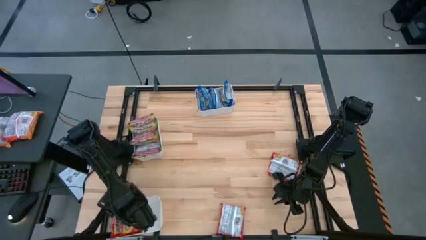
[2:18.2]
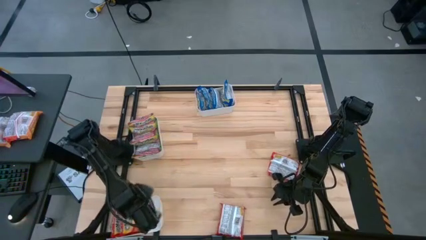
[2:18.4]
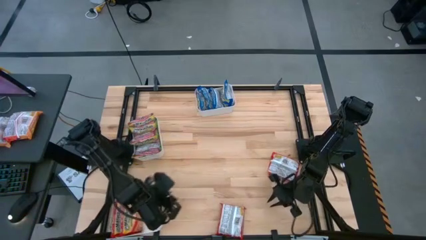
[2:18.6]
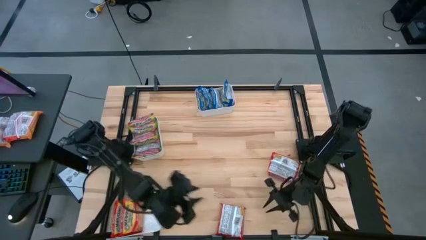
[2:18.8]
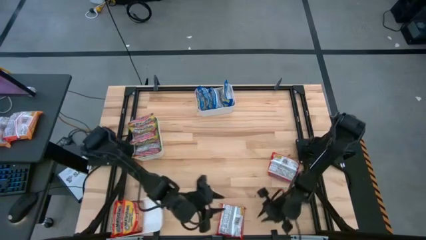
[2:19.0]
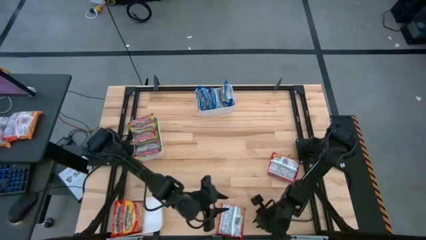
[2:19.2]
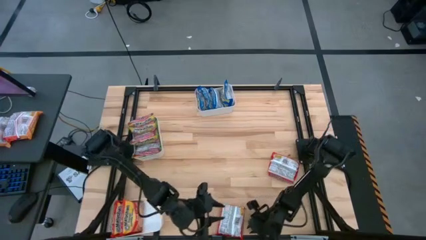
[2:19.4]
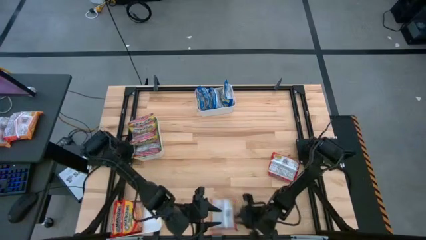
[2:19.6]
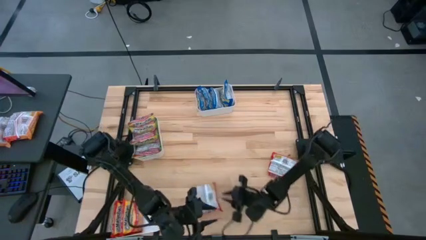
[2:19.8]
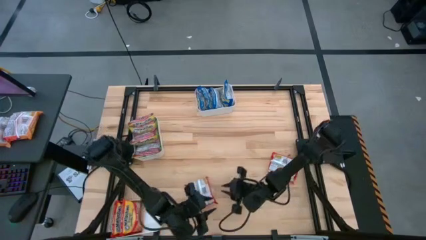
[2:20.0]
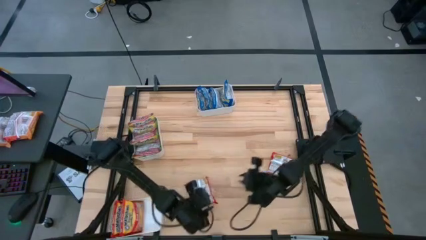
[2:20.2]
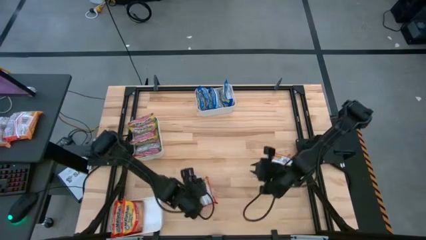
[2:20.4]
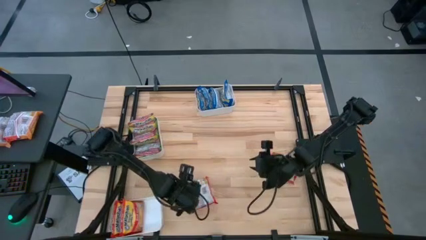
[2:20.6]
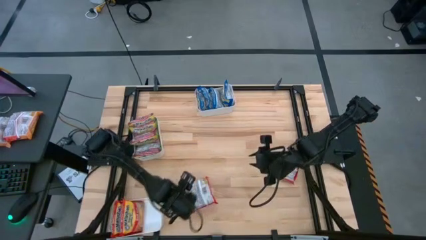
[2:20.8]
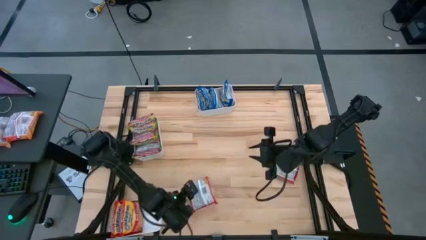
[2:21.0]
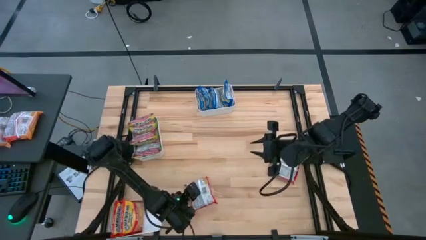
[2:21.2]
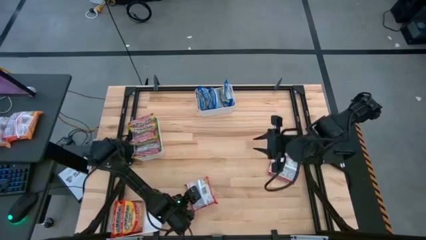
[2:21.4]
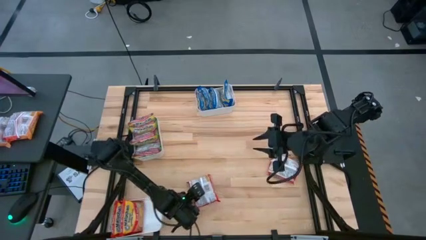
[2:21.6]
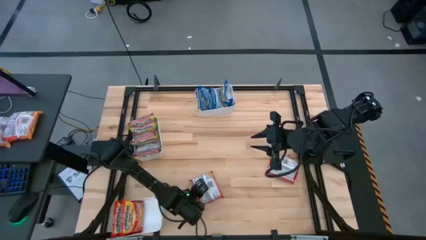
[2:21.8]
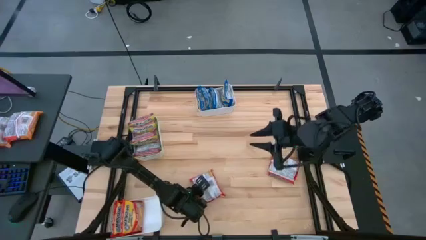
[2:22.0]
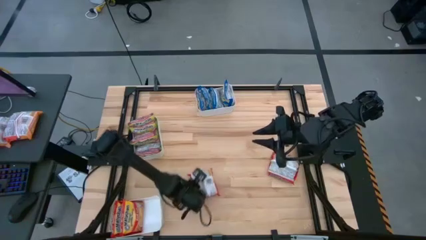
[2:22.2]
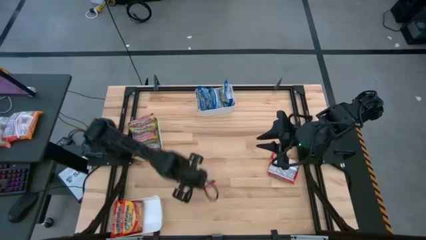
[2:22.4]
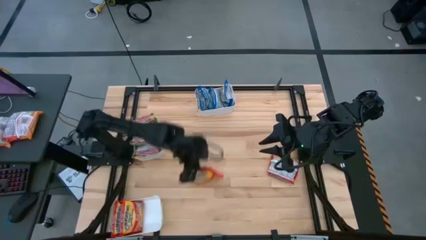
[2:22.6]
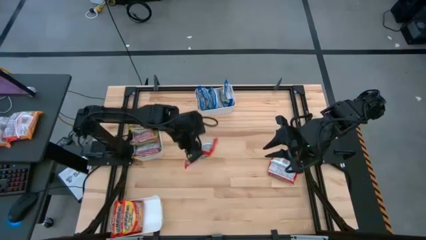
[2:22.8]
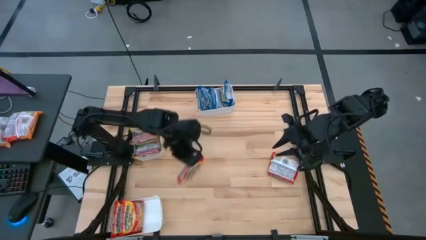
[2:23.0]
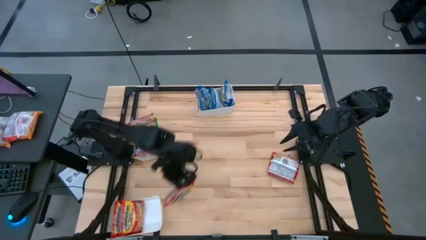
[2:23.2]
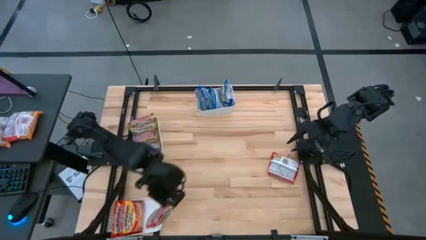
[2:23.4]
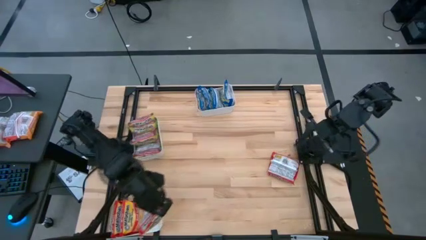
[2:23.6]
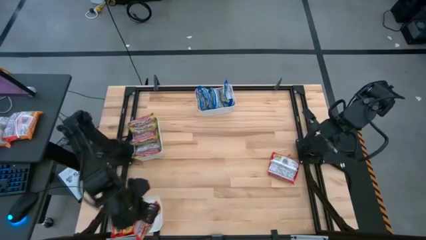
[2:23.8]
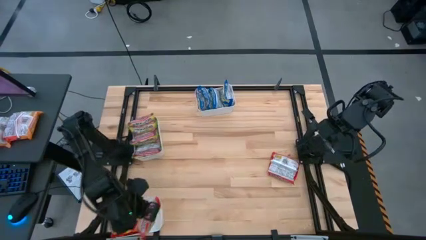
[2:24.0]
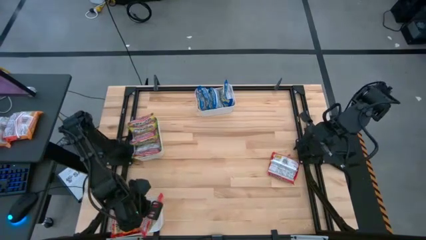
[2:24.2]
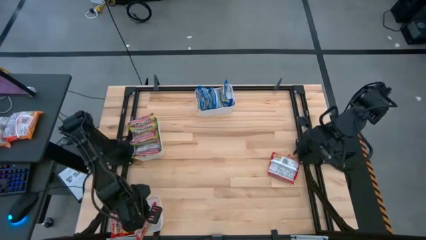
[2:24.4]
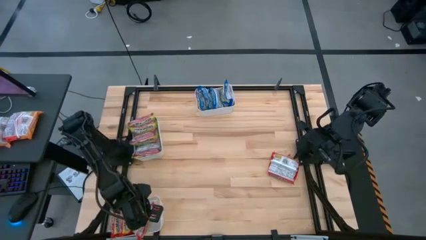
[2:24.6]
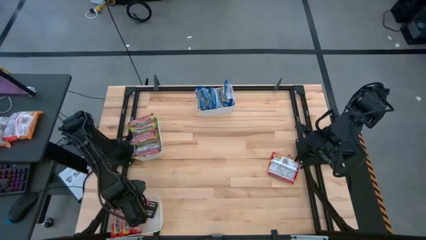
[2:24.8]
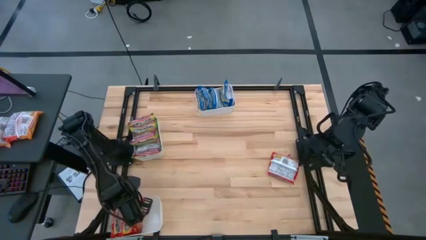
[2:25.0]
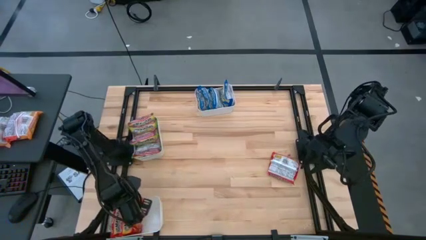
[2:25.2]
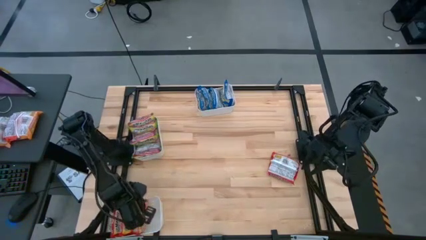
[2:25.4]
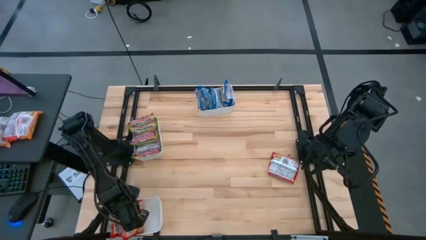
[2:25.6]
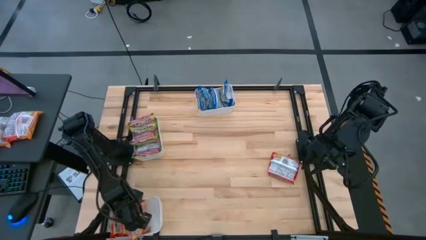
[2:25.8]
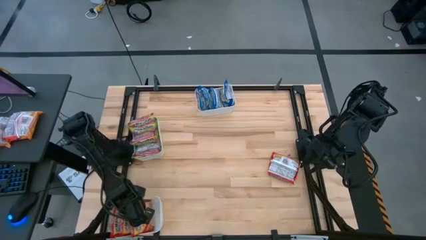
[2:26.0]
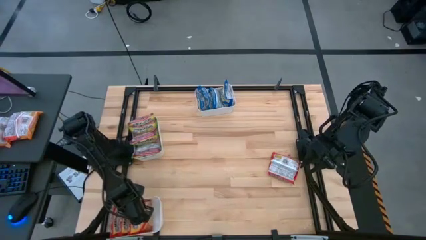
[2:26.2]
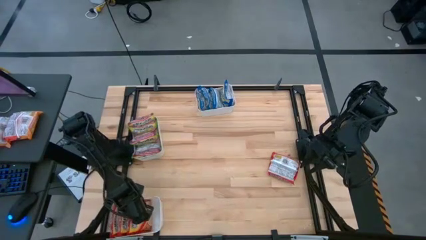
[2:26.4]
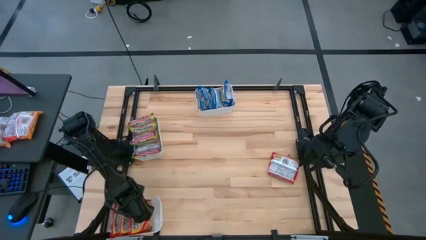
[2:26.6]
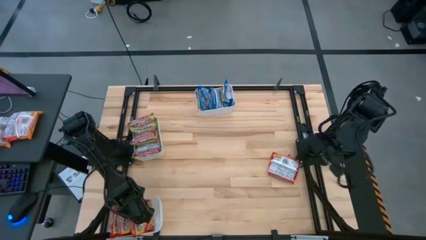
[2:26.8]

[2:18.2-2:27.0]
Task: Sort Maruchan noodles
Put the red noodle pack into the bottom white bin

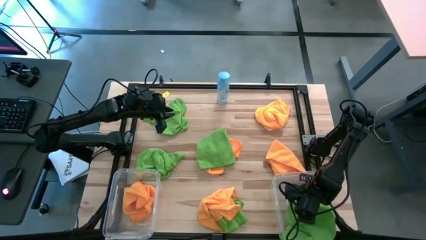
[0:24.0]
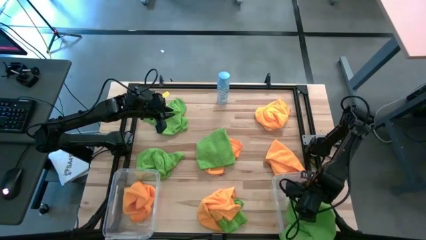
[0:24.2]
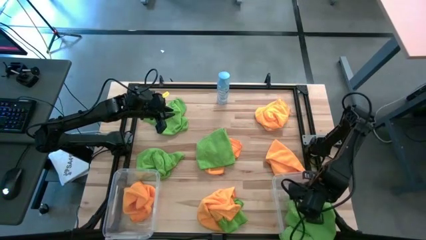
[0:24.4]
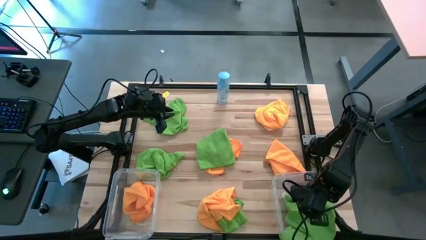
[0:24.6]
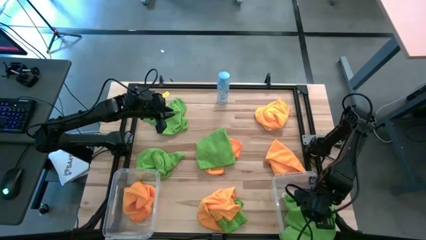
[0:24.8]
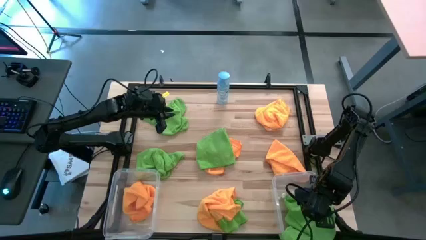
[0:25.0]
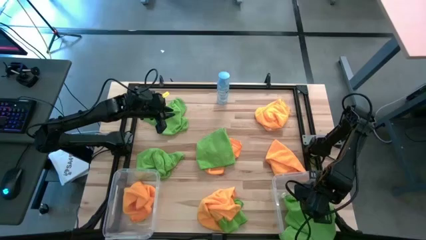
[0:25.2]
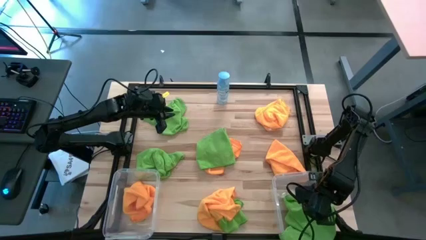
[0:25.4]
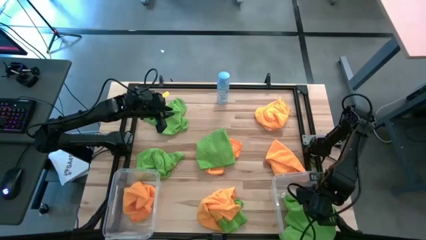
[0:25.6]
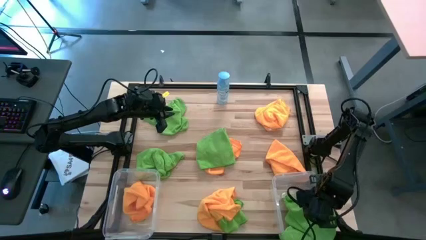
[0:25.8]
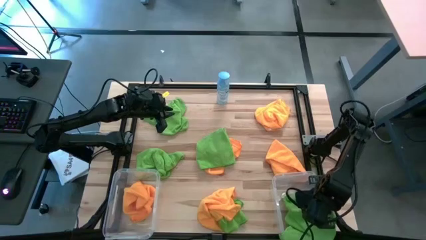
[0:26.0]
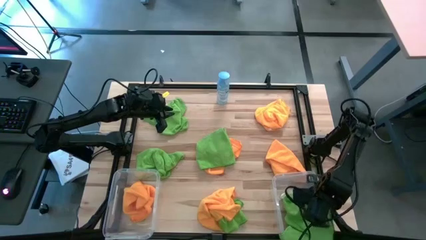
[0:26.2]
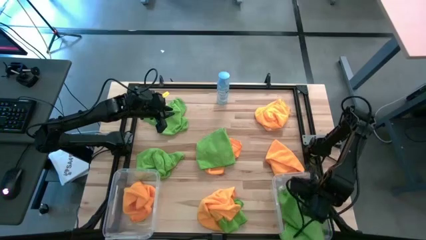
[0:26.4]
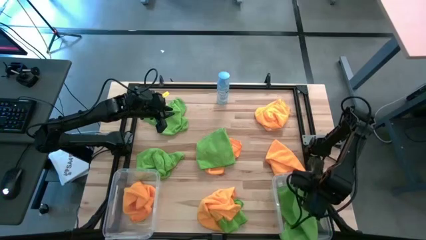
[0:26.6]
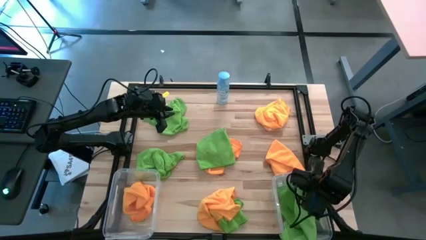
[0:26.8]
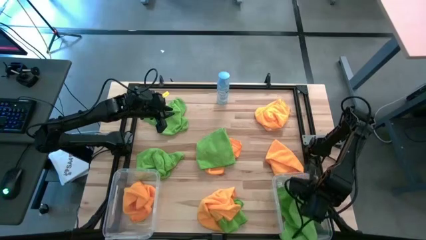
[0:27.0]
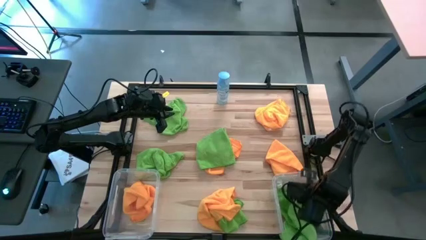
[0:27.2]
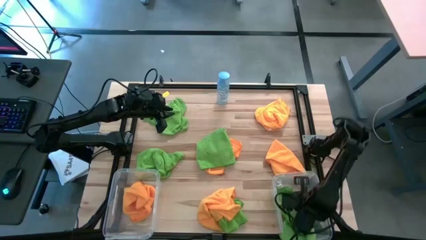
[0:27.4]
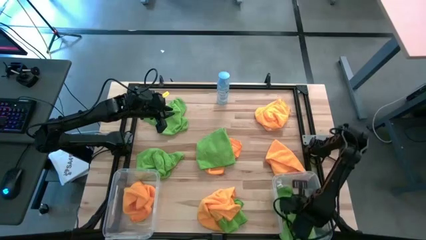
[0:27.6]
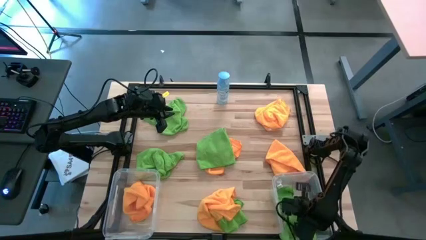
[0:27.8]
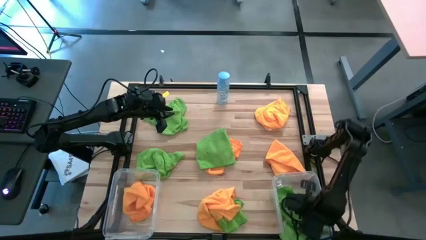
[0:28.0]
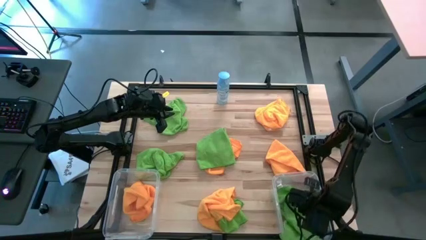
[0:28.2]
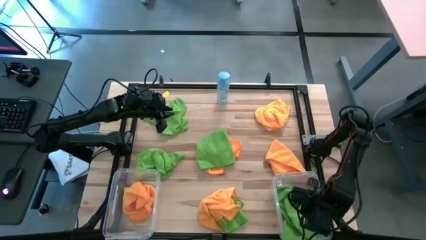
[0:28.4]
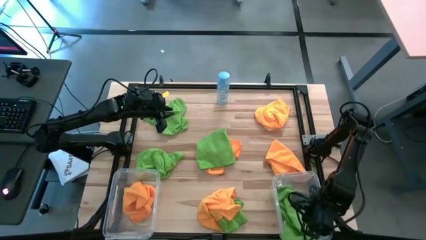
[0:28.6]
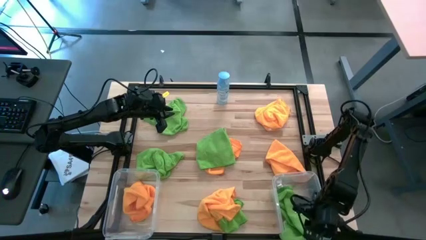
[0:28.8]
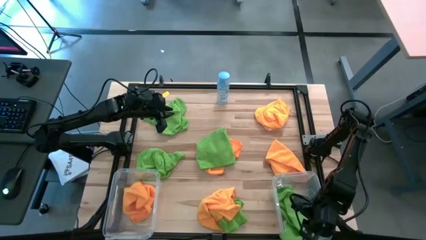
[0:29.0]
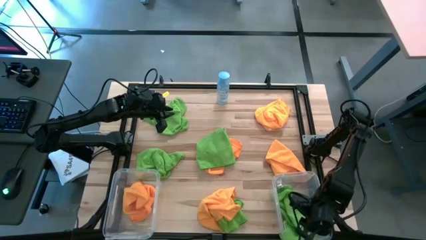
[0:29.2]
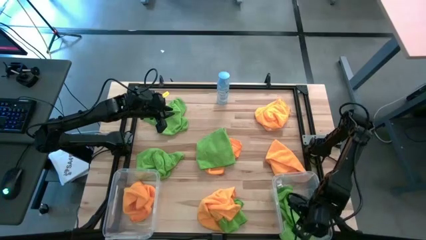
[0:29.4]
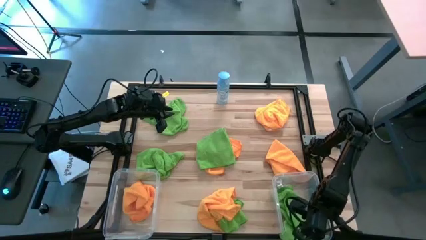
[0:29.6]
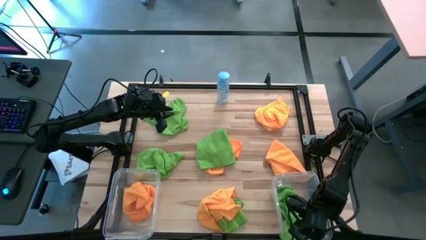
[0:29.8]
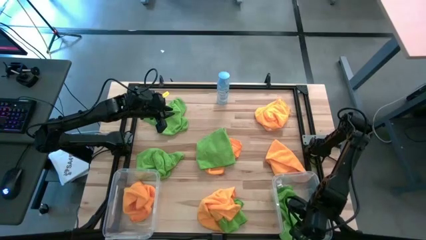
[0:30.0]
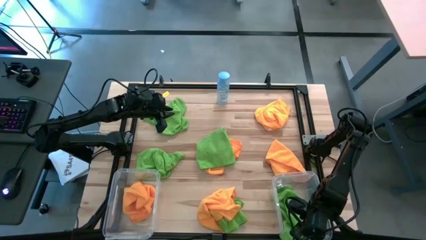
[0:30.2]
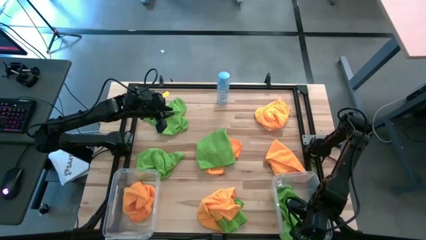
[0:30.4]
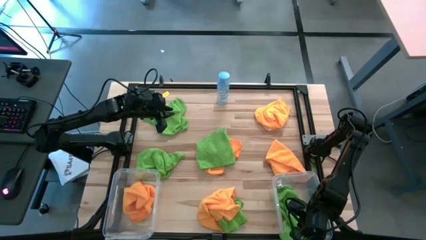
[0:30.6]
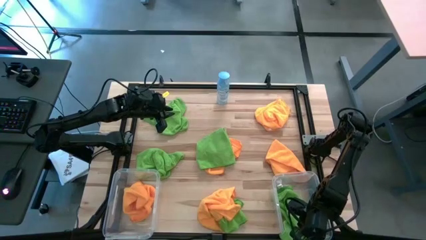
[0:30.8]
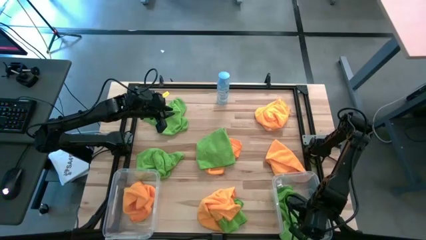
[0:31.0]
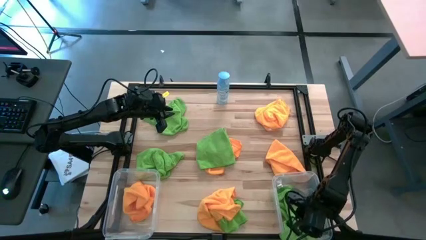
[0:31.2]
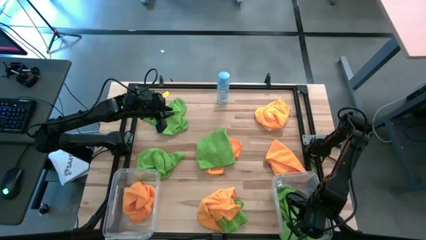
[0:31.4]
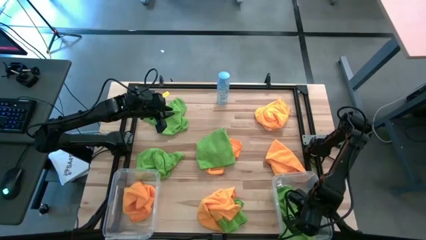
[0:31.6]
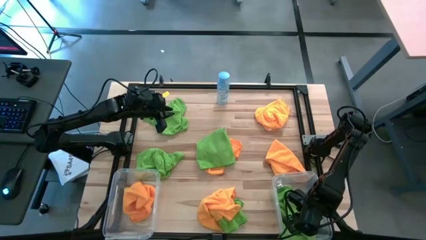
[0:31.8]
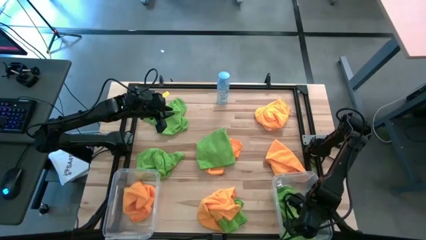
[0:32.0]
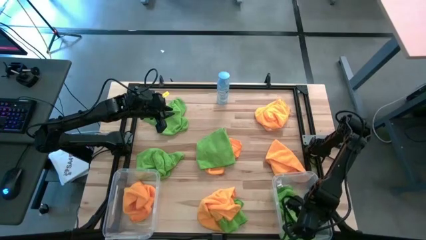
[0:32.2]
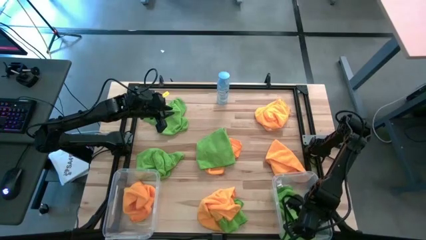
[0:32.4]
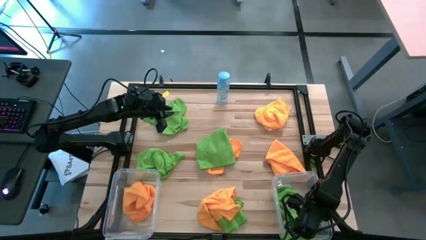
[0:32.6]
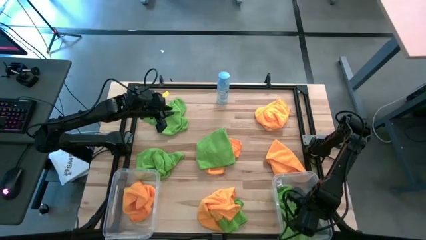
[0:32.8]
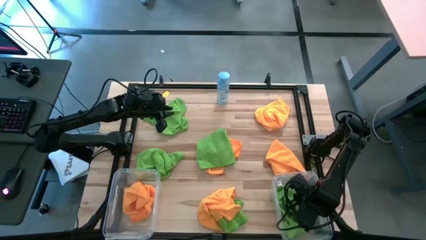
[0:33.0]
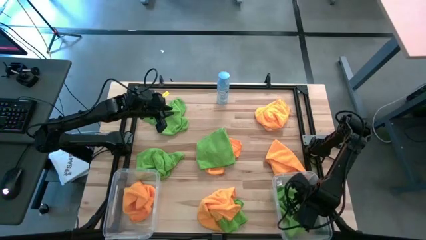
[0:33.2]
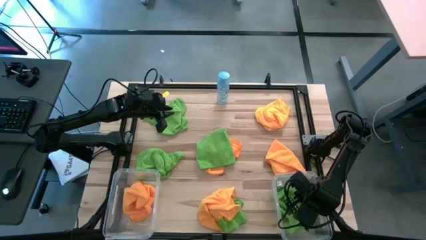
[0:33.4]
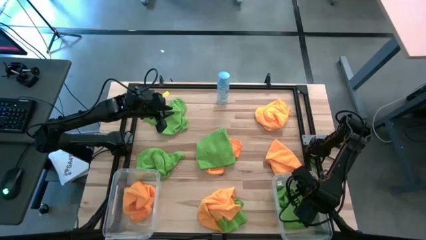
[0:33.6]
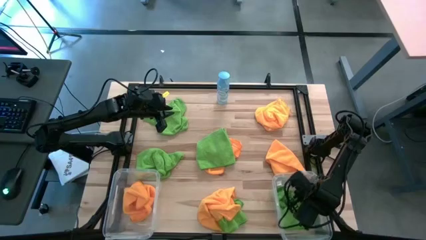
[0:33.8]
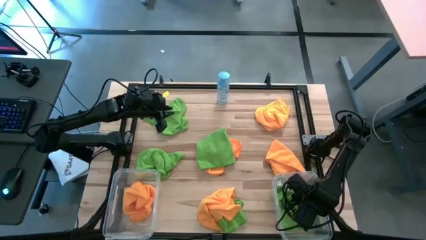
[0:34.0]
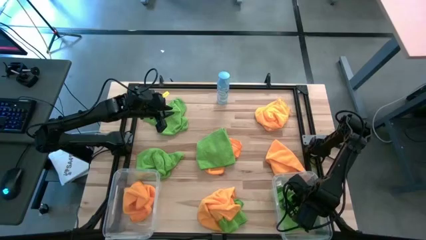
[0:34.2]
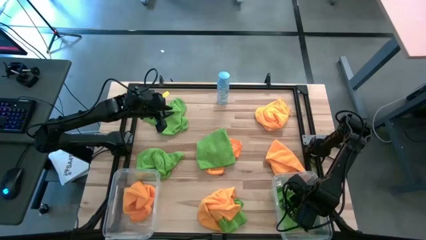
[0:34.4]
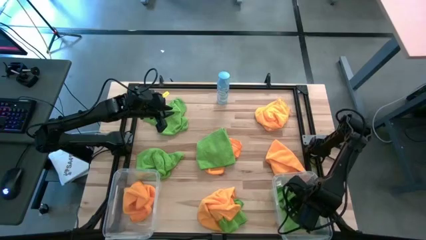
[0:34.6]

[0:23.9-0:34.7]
Task: Sort microfiber towel by color & place in baskets
Put the green microfiber cloth into the right transparent bin
